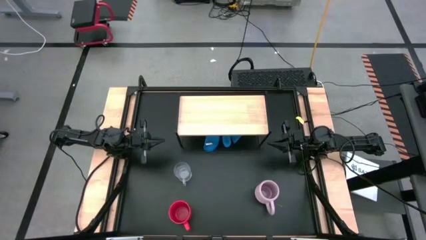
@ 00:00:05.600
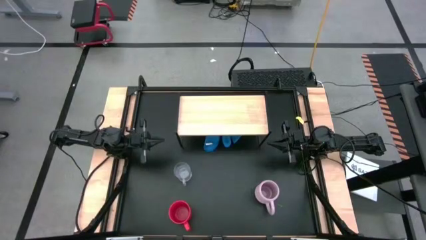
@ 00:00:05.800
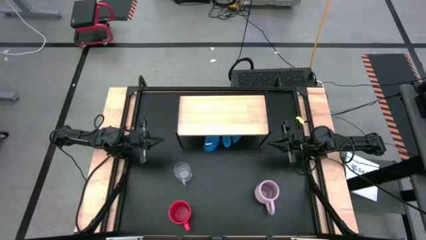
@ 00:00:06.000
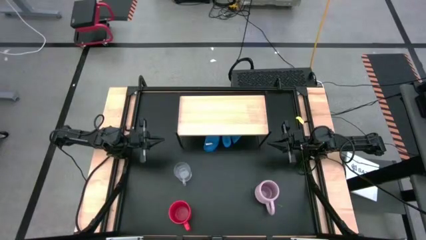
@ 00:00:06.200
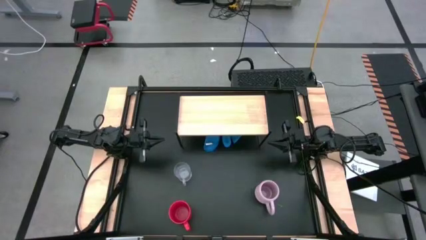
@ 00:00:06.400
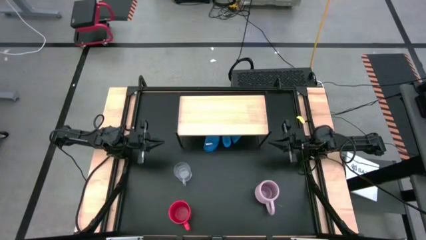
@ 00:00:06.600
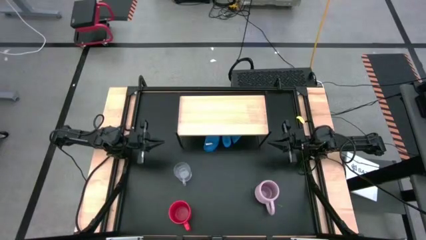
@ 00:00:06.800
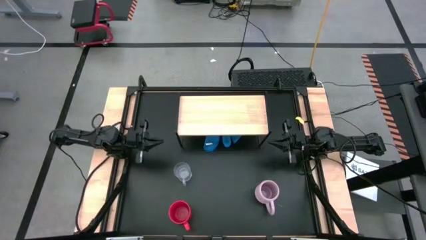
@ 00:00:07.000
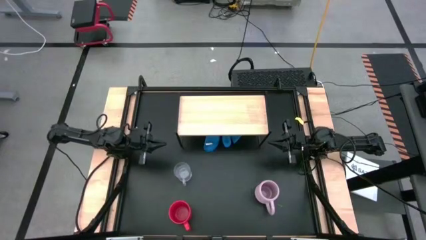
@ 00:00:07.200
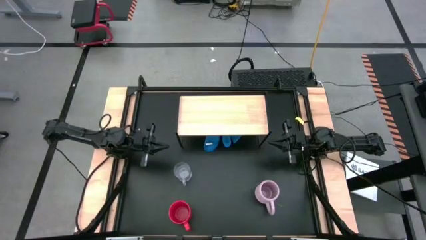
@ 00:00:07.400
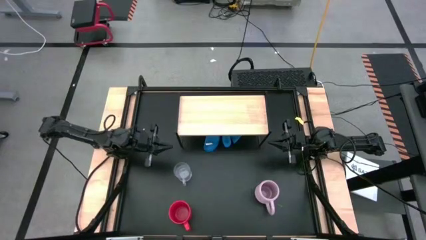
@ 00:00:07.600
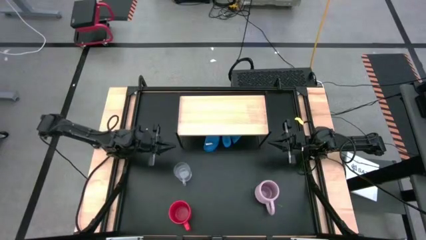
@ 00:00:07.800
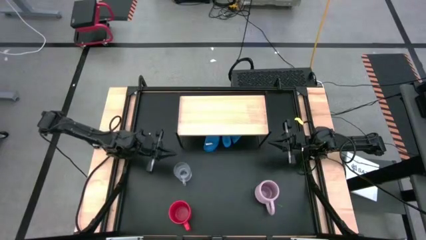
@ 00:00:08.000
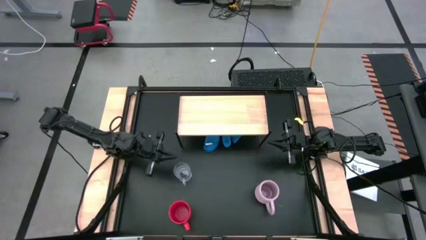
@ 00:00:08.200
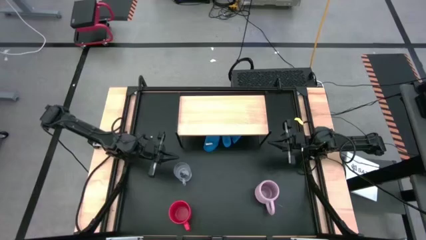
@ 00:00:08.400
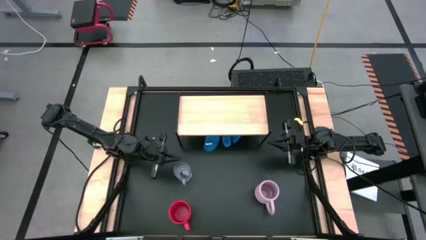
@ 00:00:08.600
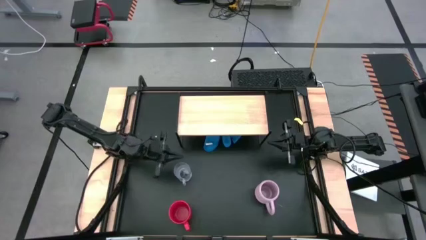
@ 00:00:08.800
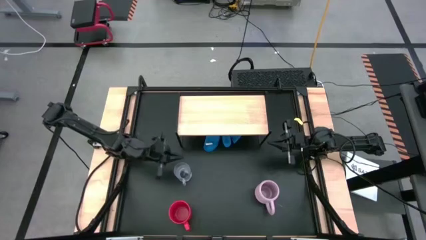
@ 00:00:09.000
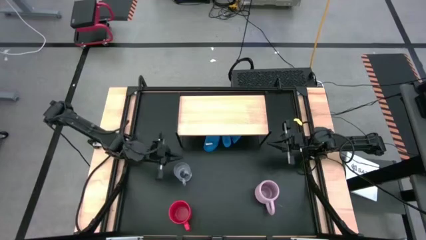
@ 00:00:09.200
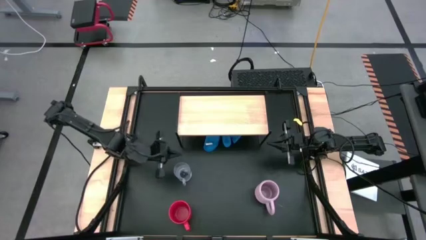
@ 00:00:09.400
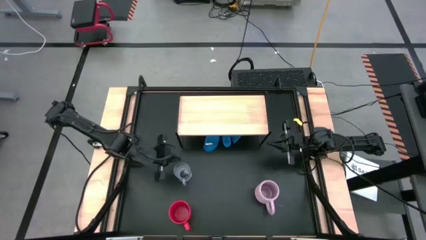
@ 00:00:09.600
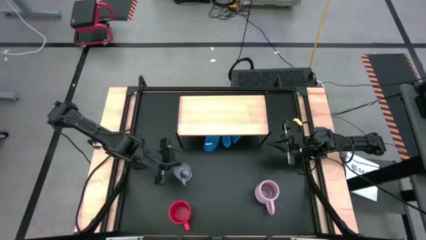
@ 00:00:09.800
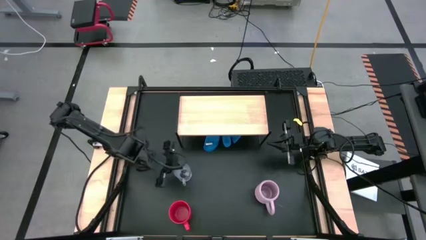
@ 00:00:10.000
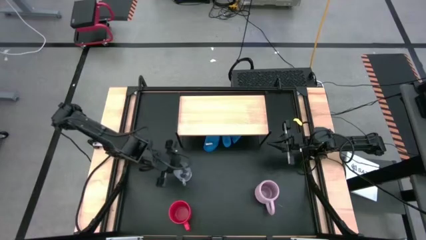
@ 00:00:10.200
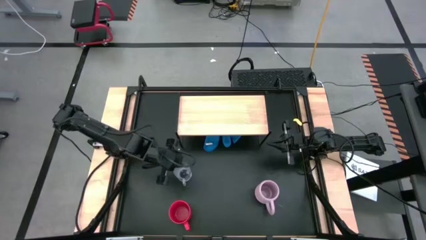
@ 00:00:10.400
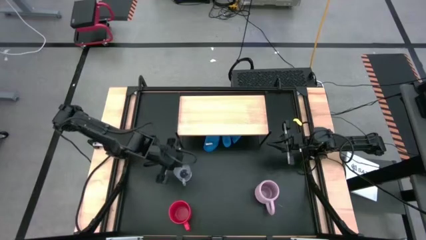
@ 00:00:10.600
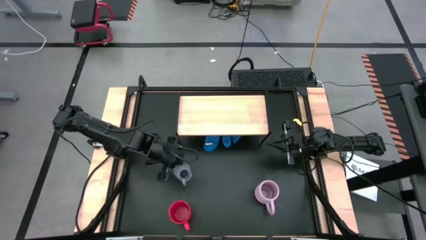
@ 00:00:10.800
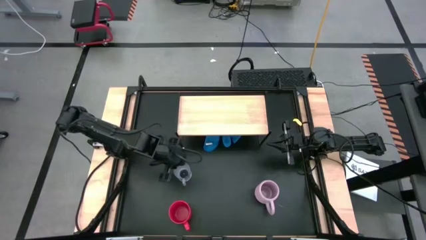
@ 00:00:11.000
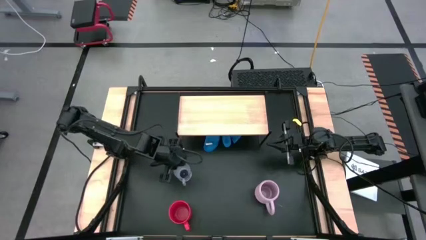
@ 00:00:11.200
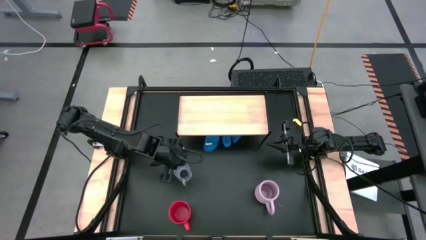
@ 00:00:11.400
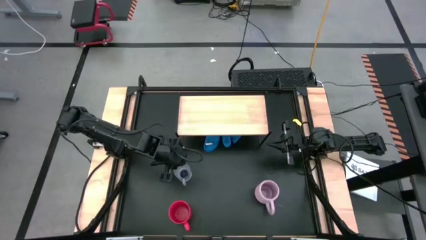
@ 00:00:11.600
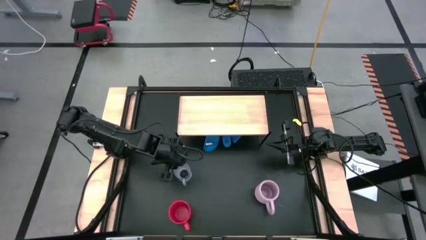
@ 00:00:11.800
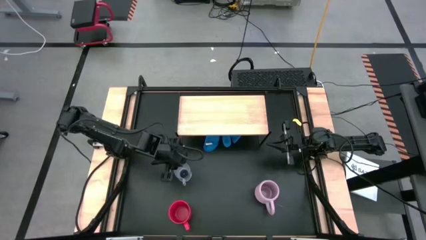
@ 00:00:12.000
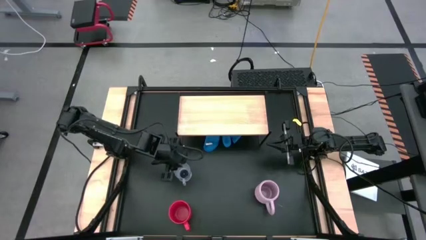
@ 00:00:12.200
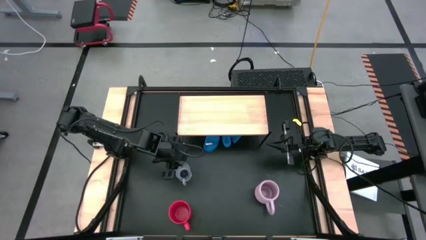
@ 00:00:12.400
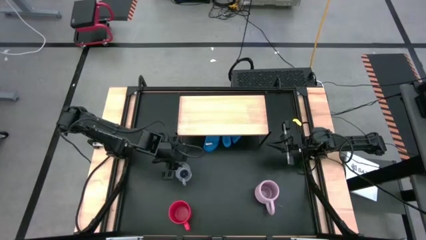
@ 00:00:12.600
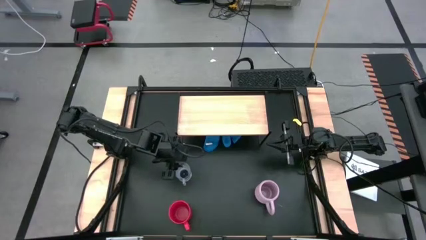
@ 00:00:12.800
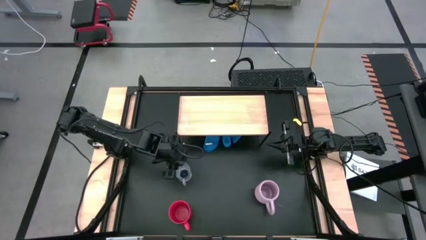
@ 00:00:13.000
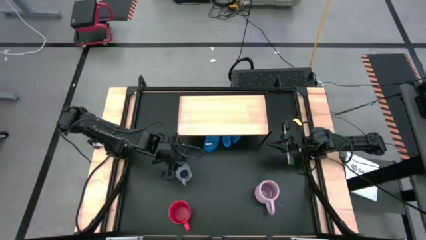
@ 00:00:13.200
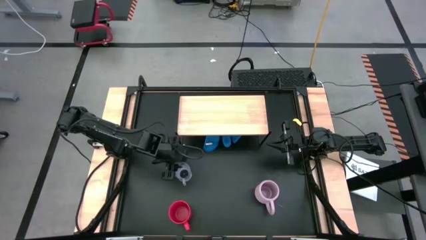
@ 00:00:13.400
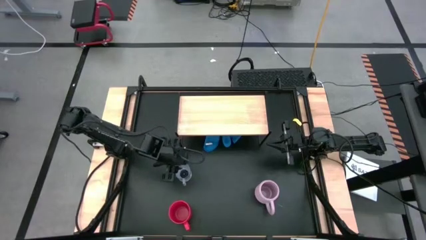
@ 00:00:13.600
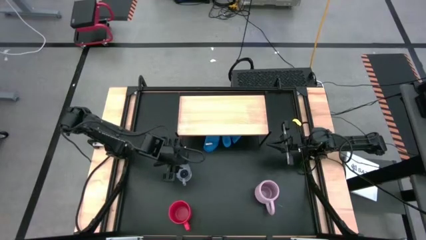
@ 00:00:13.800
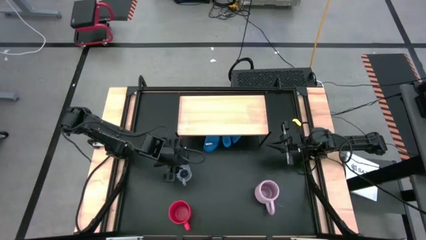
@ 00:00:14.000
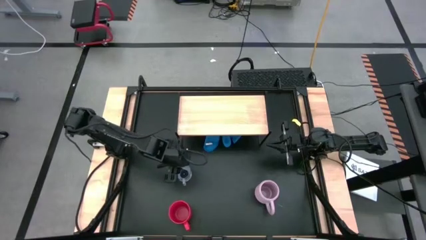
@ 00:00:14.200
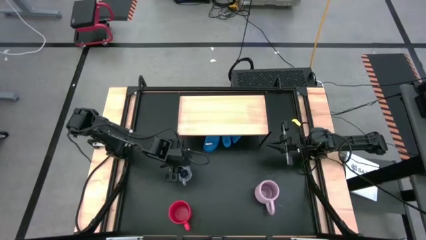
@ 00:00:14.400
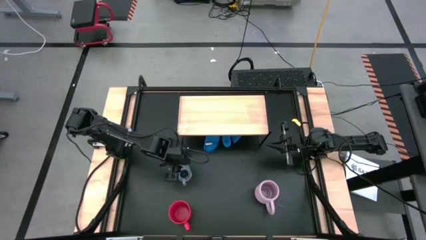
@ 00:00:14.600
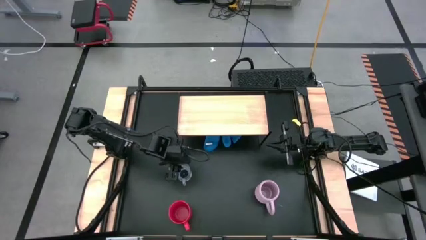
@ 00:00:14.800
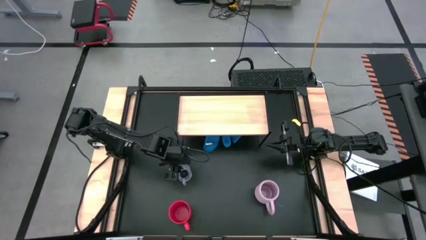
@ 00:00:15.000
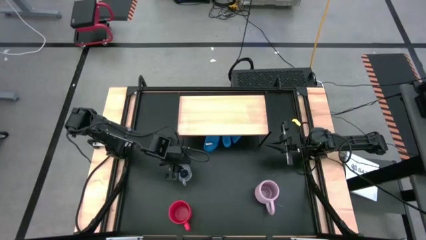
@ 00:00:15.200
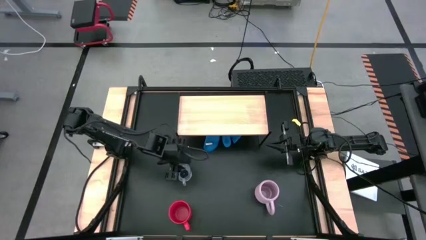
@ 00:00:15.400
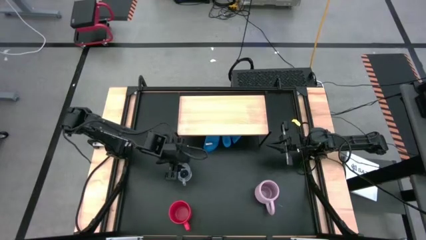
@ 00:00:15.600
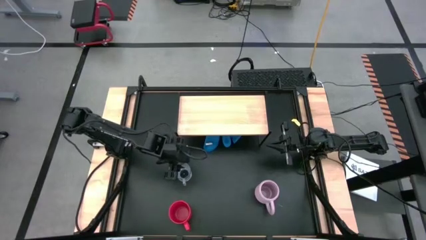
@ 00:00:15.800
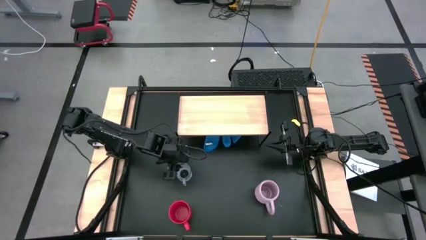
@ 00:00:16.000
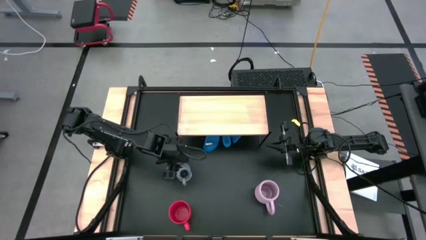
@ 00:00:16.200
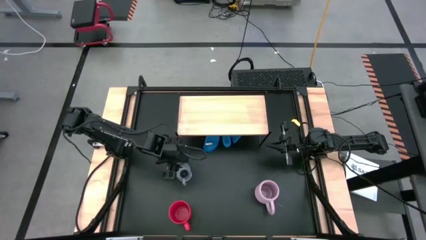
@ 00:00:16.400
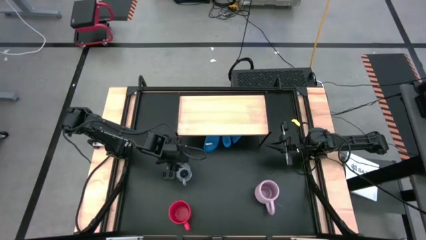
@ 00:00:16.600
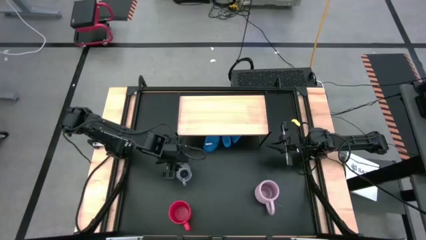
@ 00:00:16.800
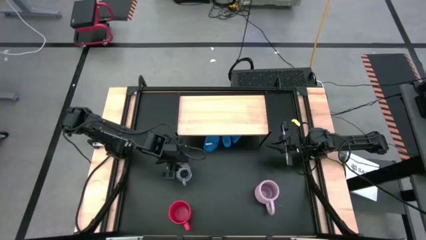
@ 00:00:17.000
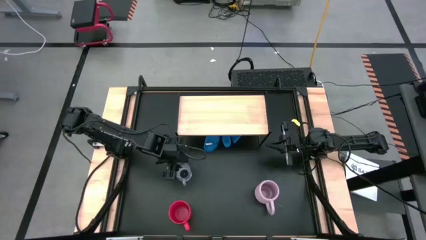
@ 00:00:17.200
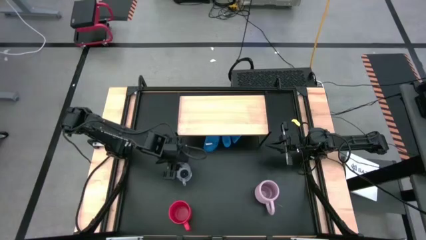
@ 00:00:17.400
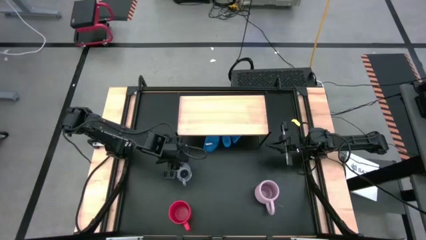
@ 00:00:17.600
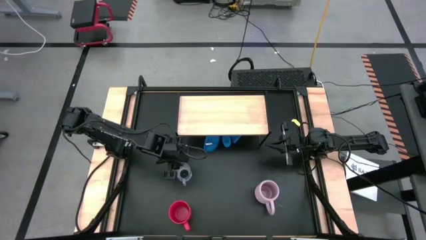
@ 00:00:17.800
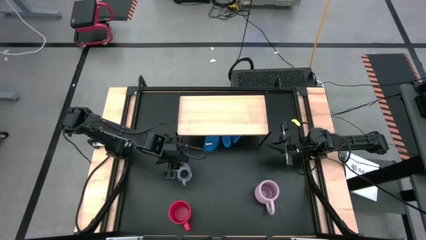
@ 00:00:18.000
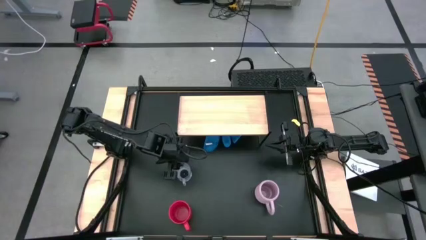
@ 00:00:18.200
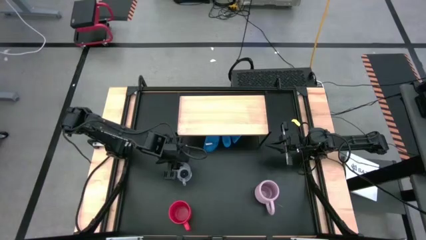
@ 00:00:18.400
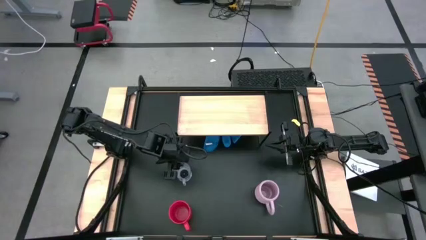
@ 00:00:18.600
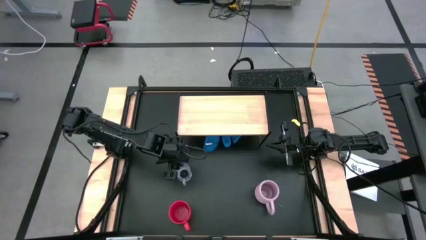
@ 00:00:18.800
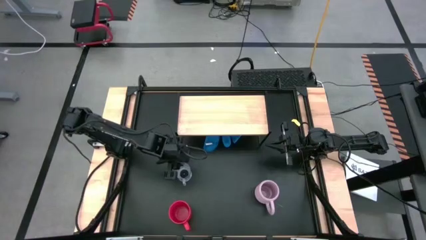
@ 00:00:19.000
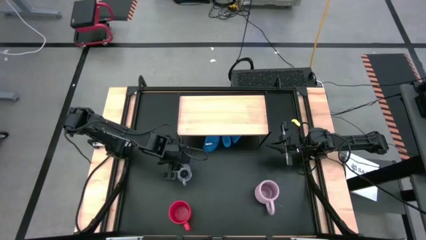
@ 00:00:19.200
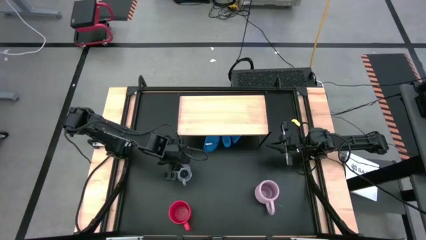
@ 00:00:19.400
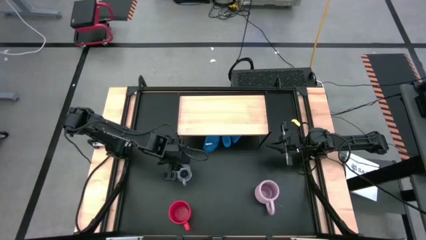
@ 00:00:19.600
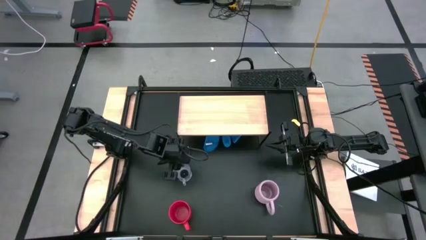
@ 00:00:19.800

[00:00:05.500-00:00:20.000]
Task: Stack small to large cups/mugs on shelf
Put the transparent mug on the shelf
